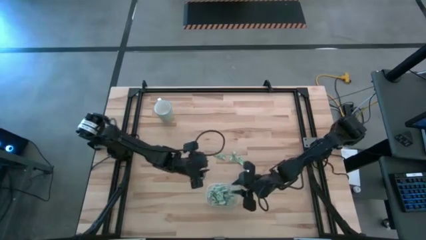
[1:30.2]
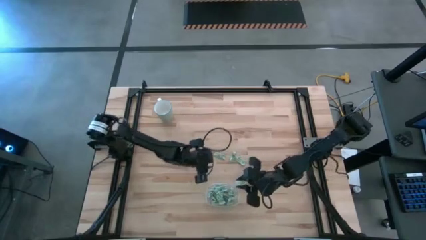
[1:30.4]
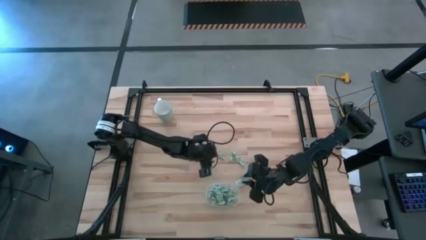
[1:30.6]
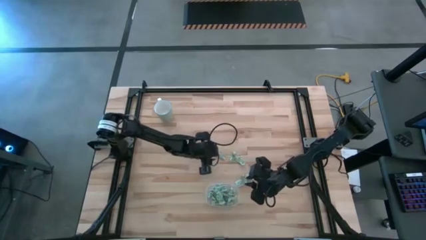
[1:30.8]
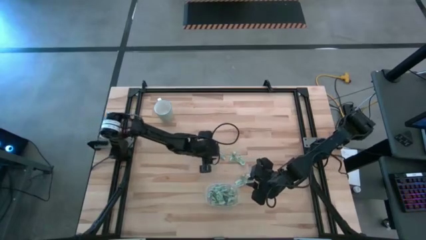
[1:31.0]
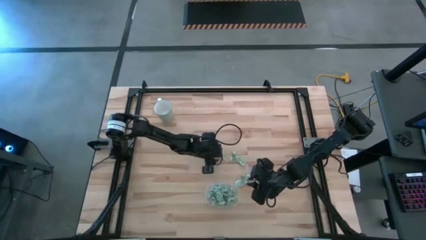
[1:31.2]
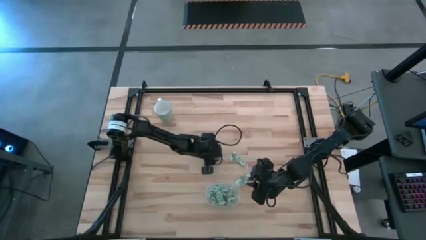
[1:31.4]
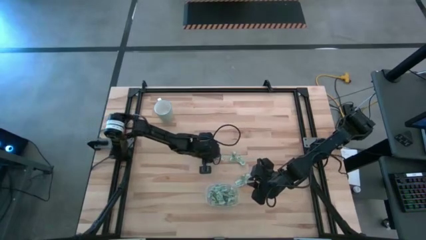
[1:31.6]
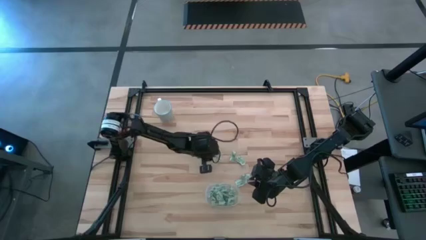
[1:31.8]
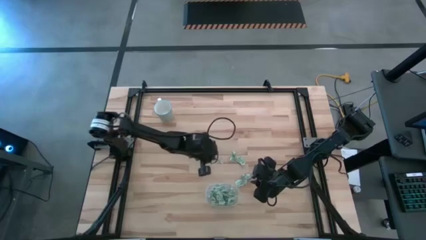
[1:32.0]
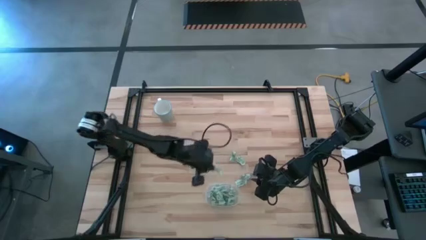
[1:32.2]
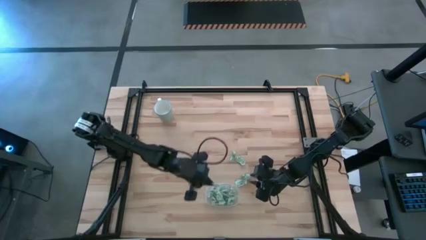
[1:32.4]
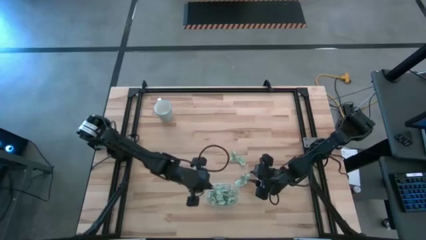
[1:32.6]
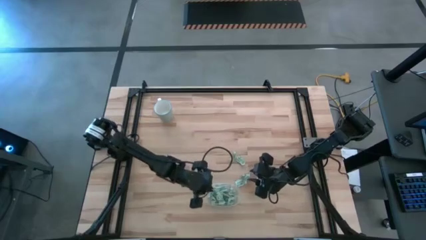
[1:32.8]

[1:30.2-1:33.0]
Task: Pick and place Stevia / Truvia into bins
Put the stevia packet into the transparent container

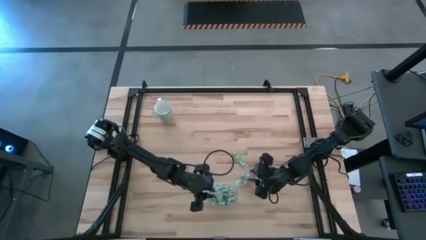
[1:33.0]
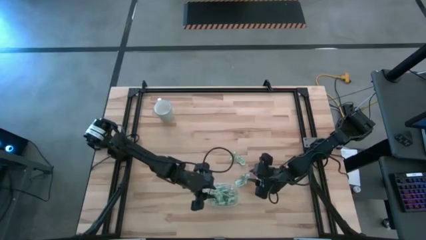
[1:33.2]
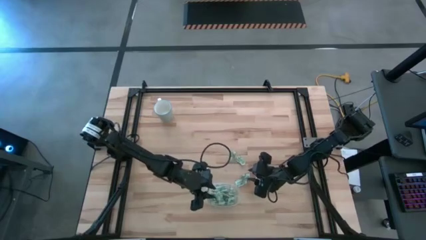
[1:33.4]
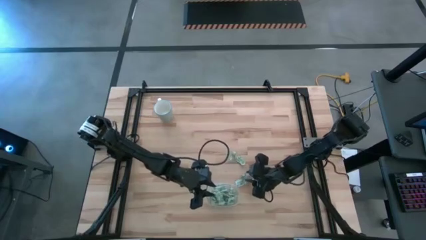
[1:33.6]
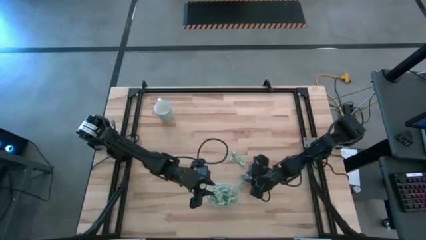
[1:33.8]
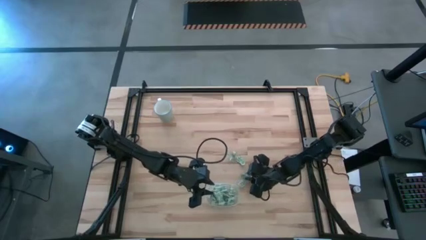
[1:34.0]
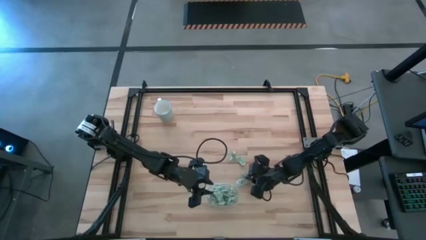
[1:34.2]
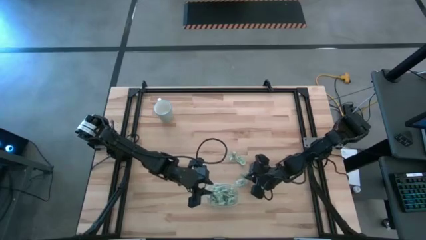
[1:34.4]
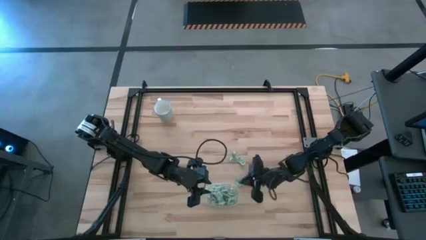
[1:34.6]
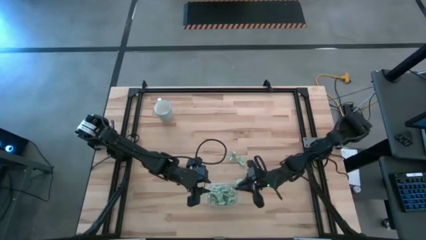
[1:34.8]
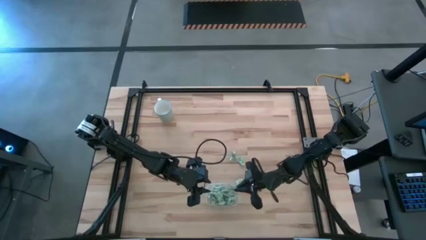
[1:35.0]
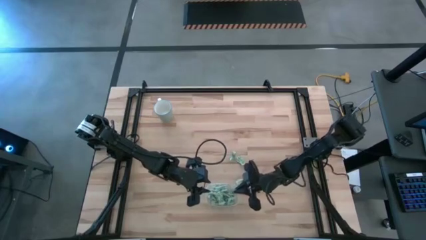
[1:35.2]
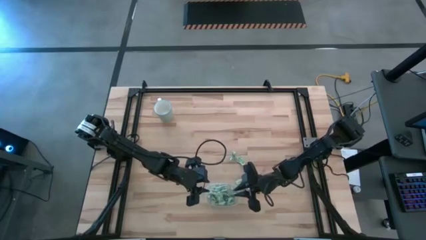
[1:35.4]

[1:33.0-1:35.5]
Put the stevia packet into the transparent container

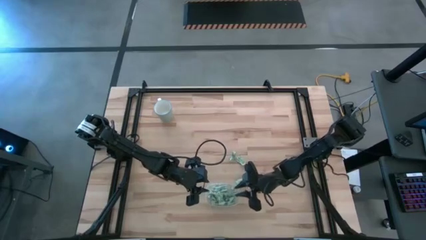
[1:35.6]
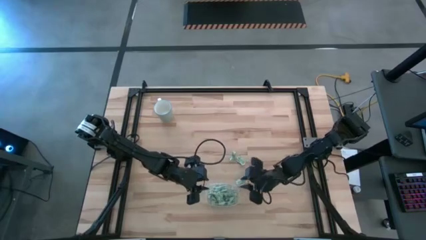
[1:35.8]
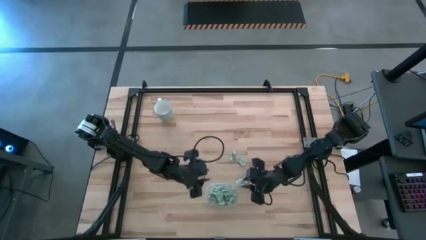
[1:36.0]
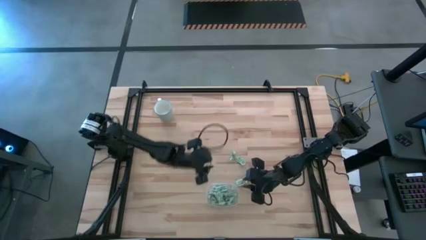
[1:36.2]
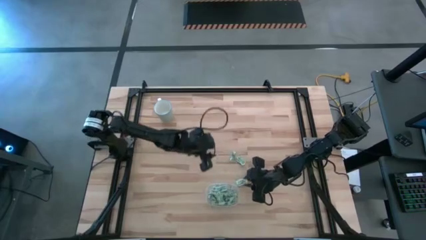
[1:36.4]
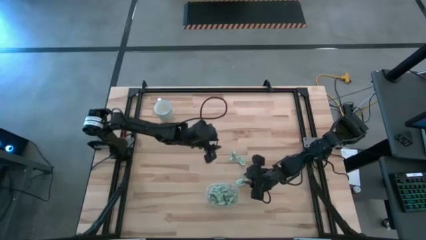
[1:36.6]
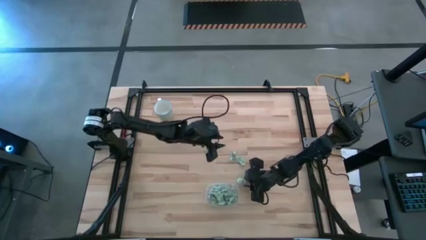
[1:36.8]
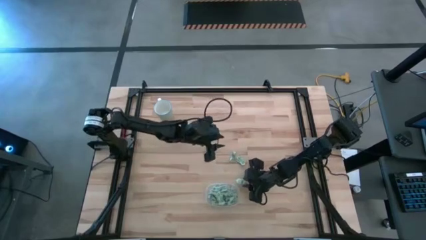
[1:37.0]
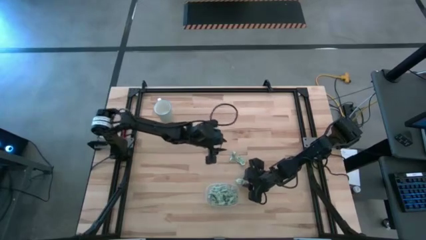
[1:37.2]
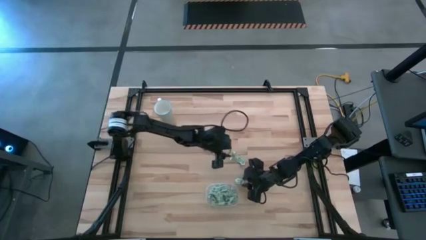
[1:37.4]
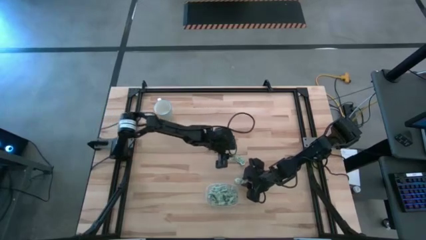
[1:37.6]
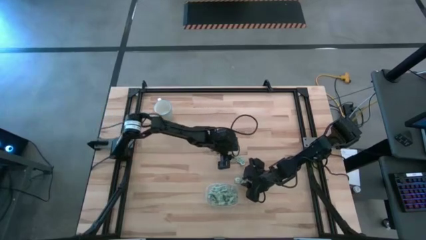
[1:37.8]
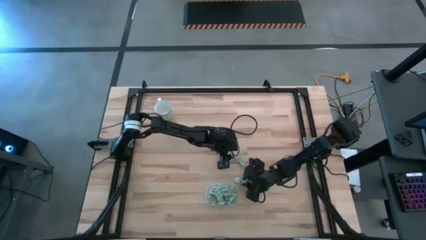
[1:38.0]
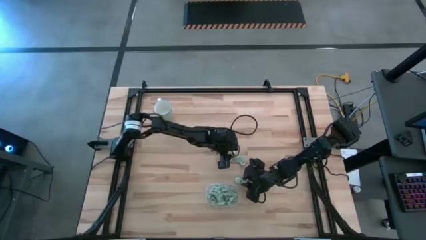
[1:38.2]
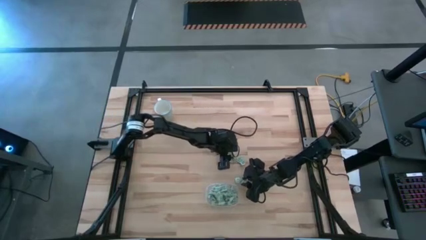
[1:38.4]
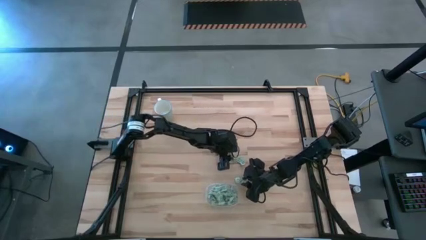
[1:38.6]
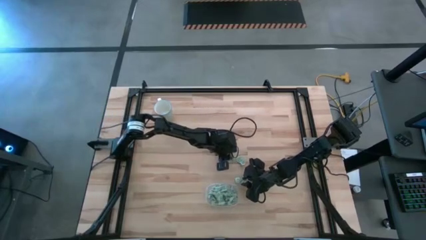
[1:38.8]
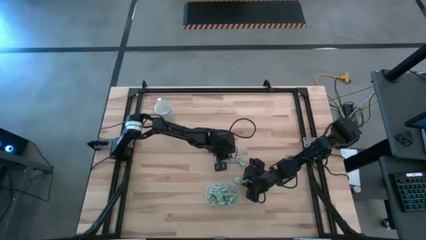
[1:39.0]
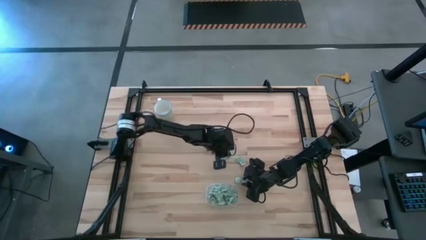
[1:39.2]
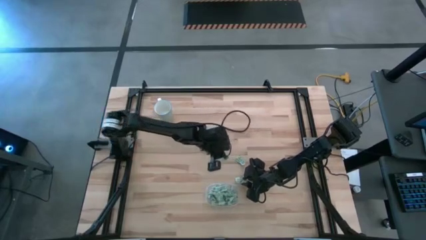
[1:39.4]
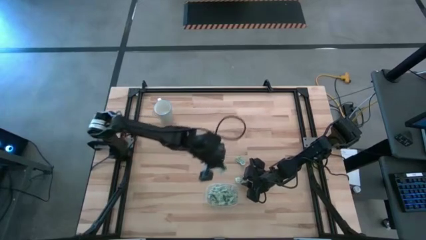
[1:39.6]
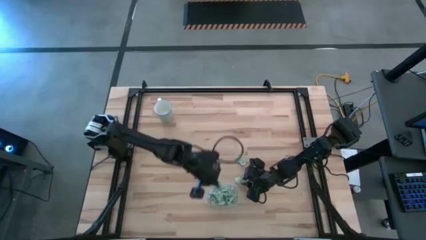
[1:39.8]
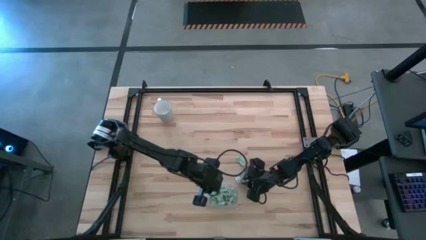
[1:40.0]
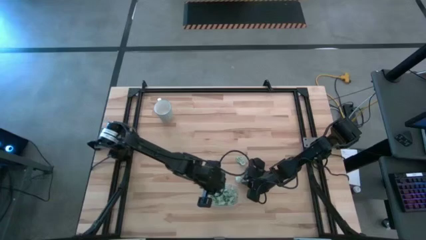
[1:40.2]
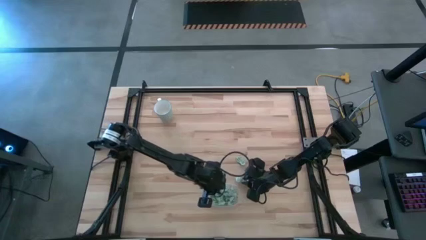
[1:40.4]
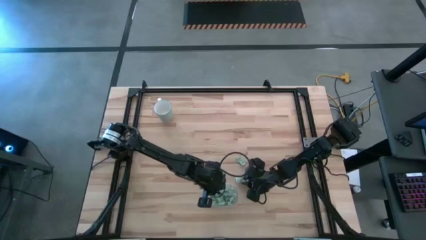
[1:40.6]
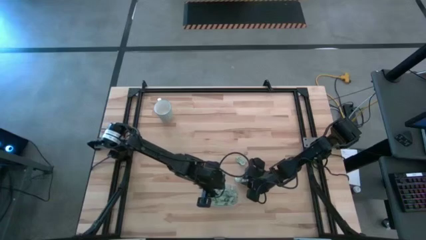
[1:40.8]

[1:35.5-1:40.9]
Put the top left stevia packet into the transparent container

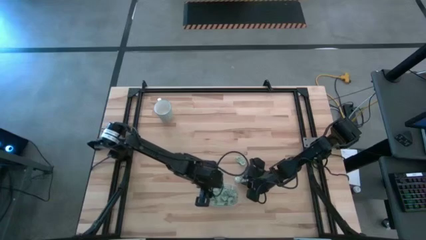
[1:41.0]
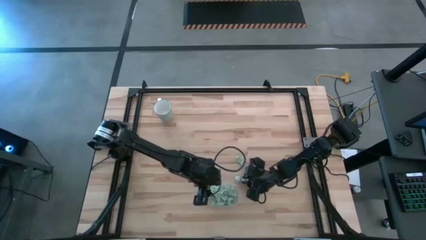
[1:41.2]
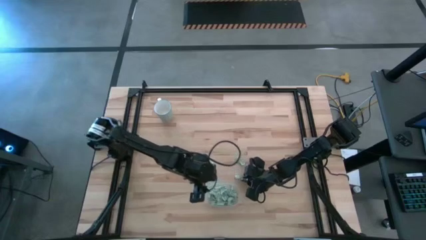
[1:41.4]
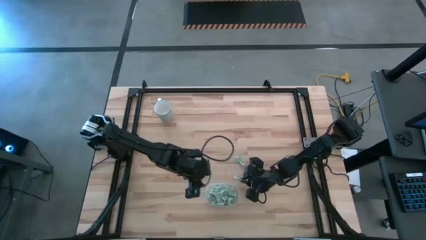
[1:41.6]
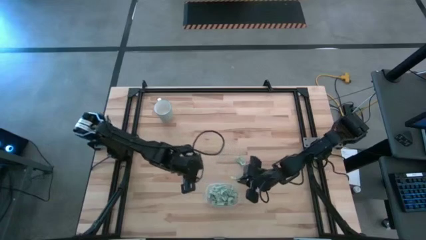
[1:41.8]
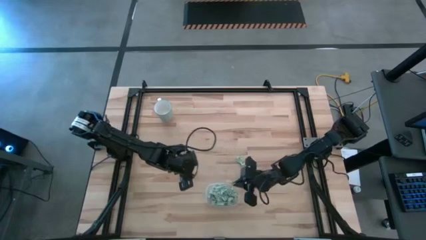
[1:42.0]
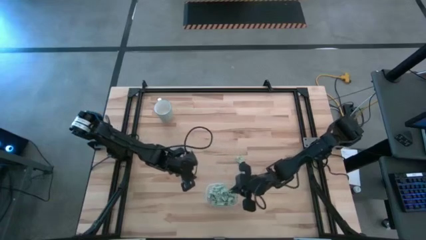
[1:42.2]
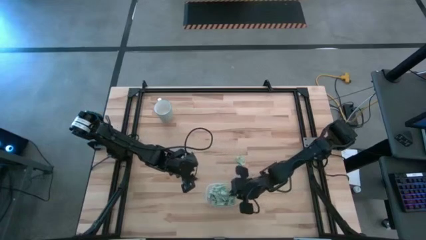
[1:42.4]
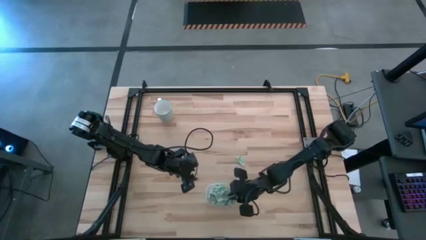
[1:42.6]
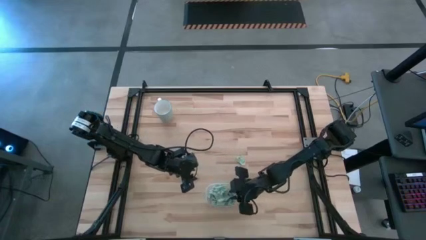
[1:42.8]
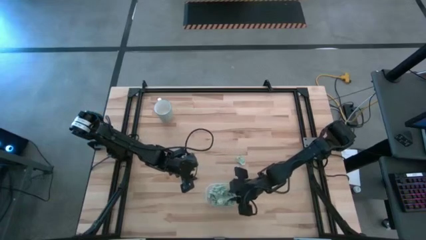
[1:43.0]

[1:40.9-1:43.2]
Put the bottom stevia packet into the transparent container

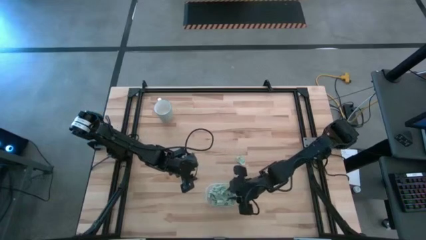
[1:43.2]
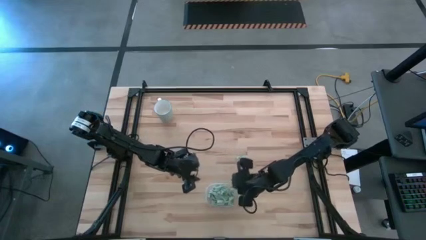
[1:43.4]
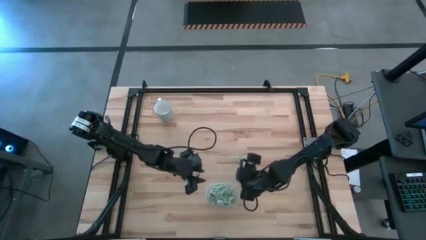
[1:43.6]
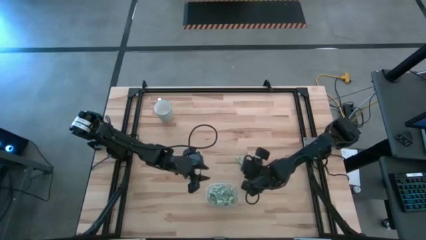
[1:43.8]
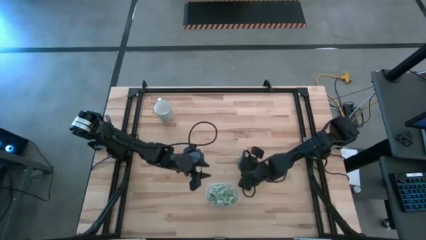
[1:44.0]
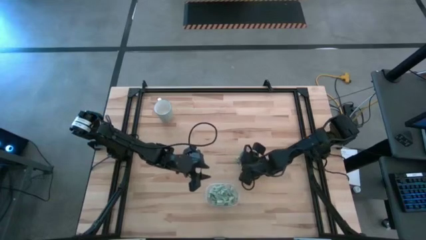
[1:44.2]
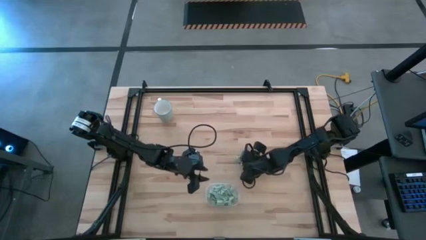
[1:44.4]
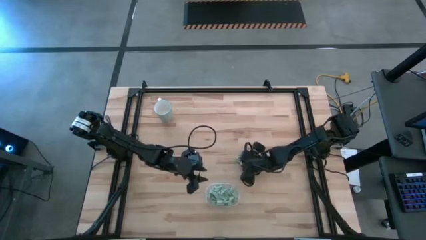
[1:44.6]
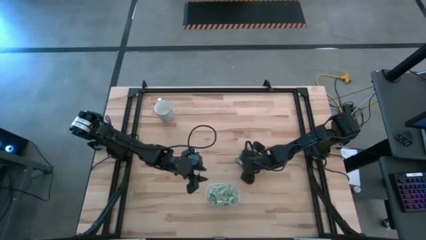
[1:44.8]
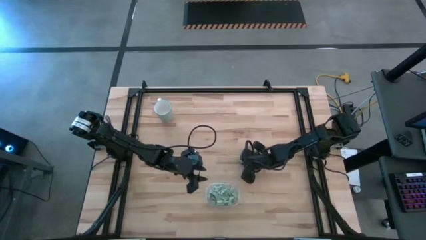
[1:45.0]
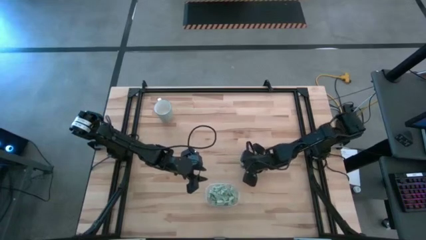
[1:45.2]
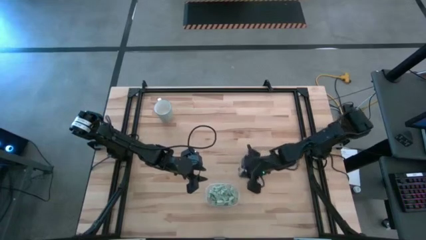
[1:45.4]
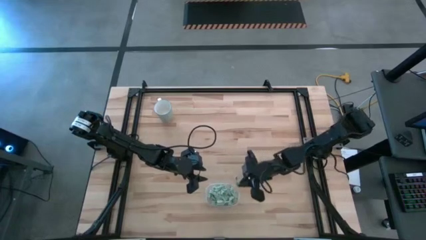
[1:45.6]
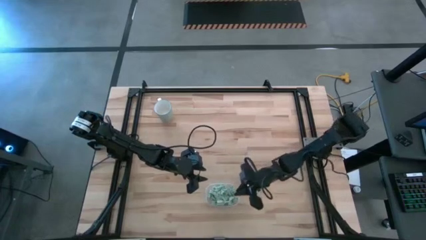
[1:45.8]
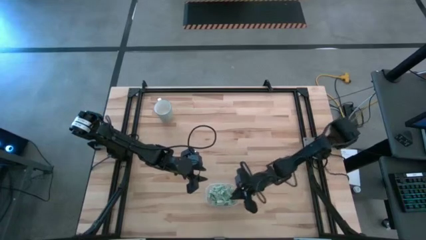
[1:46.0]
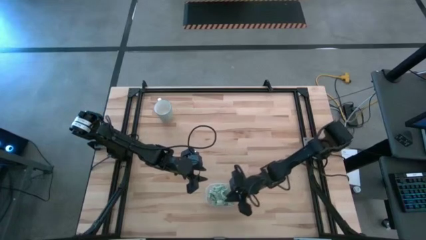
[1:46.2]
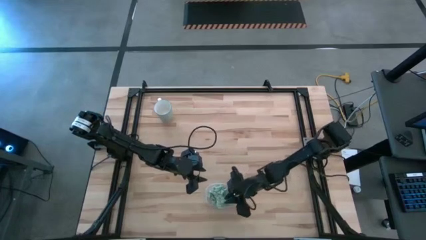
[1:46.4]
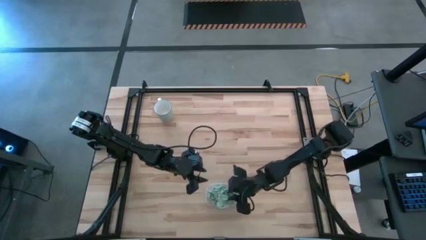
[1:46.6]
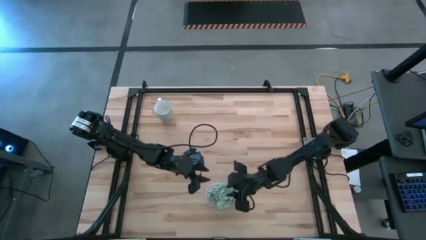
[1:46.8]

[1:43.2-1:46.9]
Put the stevia packet into the transparent container
